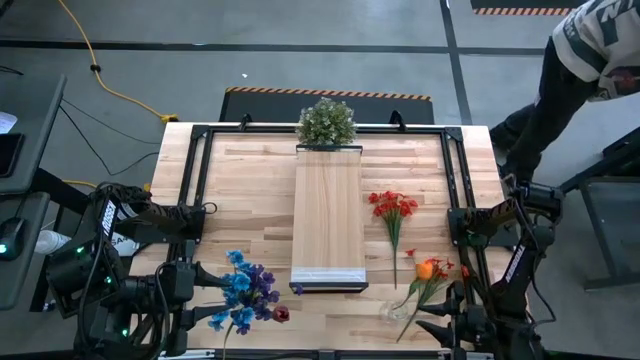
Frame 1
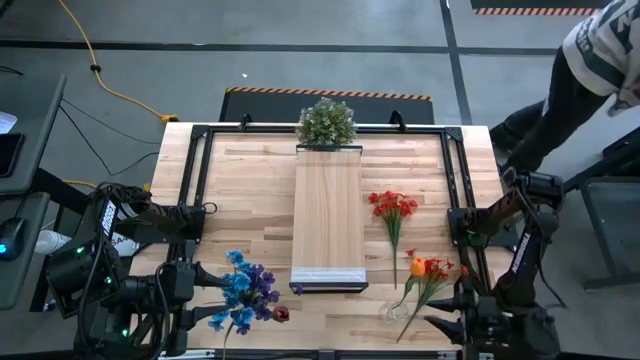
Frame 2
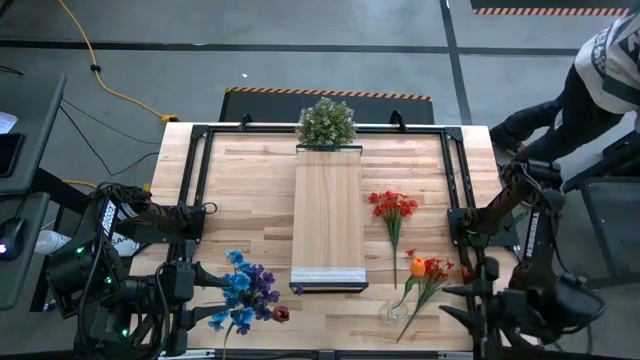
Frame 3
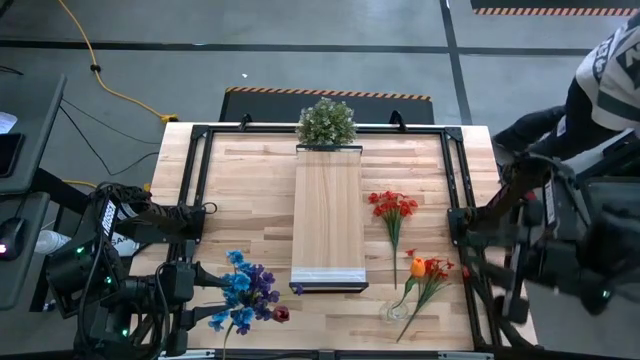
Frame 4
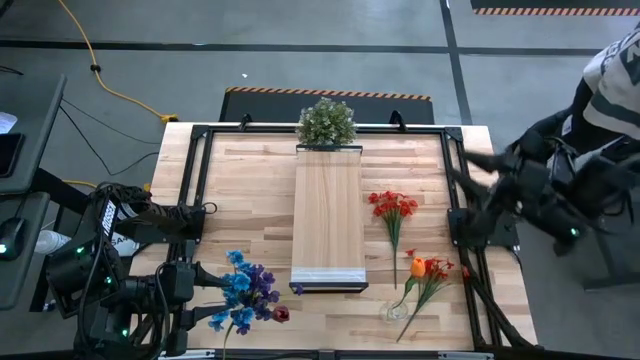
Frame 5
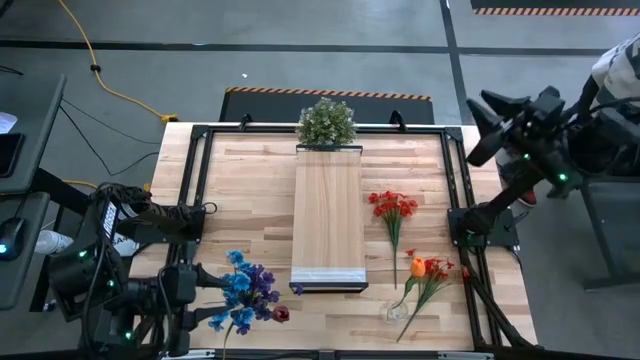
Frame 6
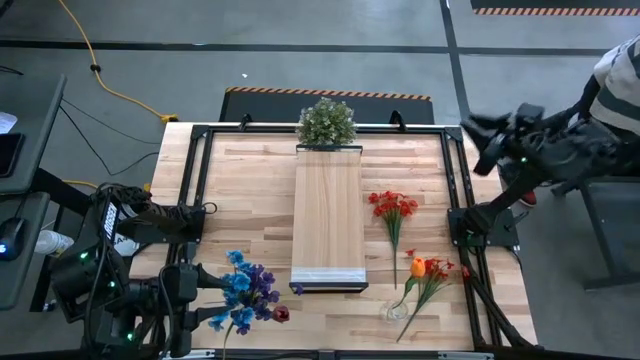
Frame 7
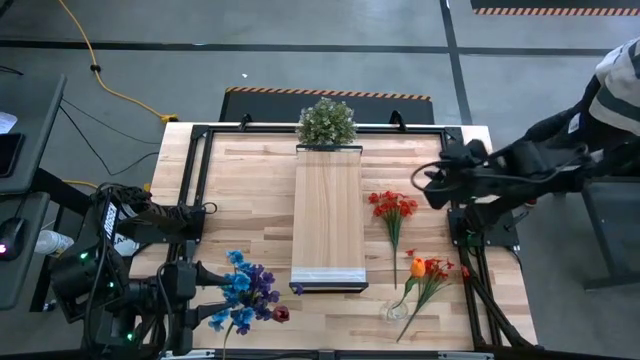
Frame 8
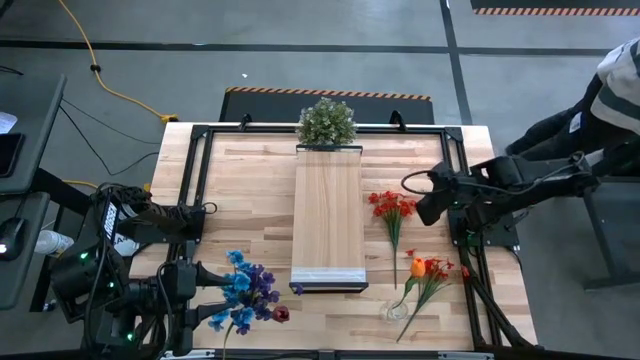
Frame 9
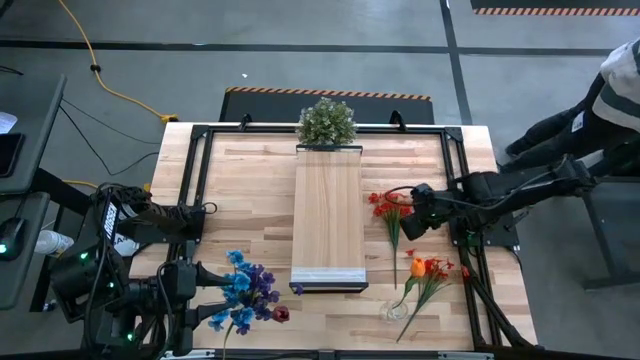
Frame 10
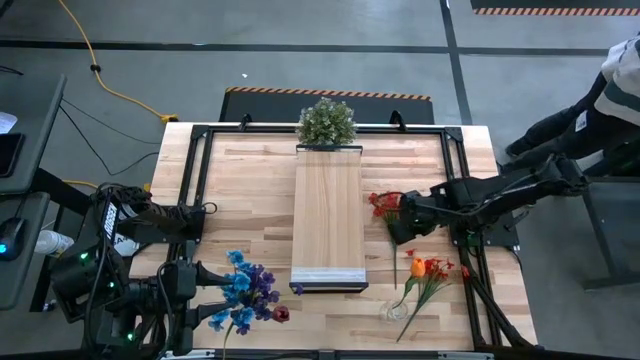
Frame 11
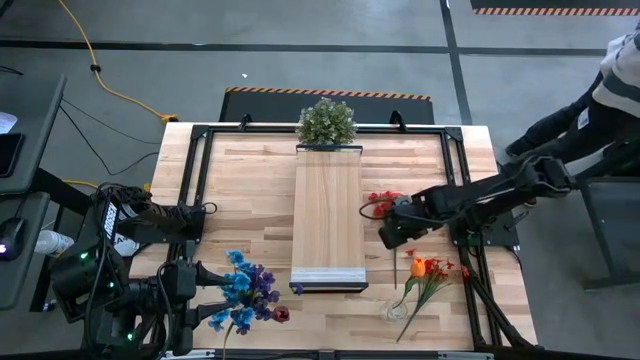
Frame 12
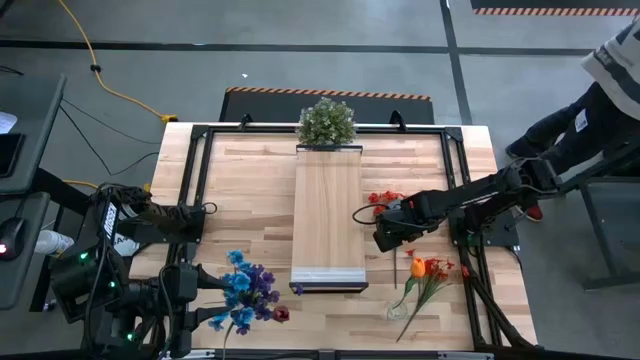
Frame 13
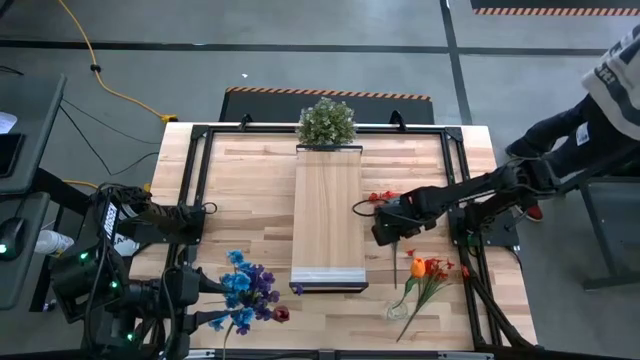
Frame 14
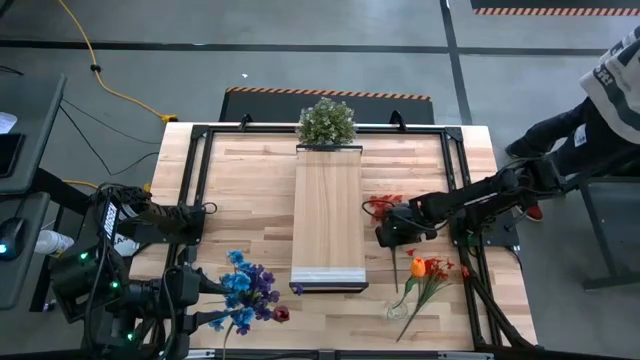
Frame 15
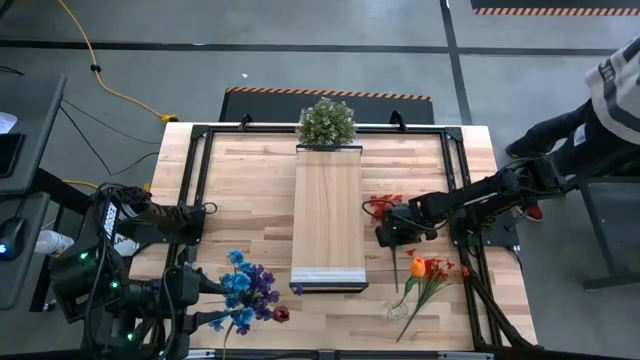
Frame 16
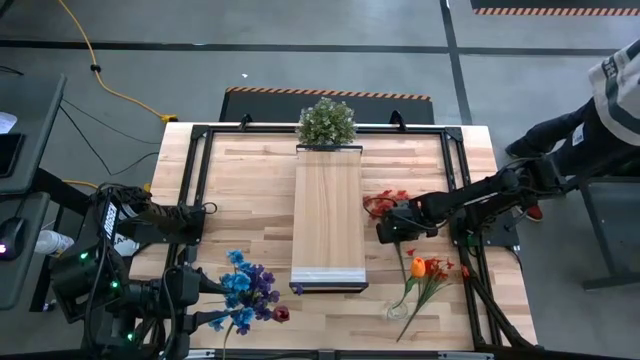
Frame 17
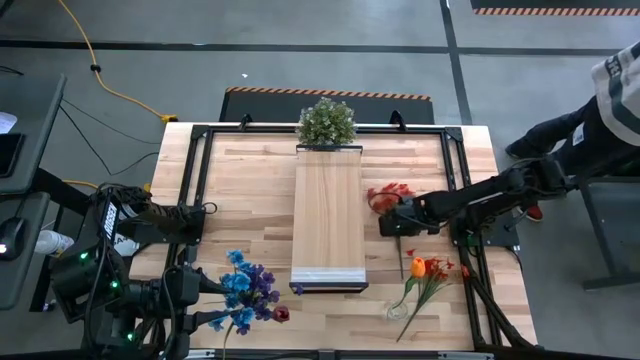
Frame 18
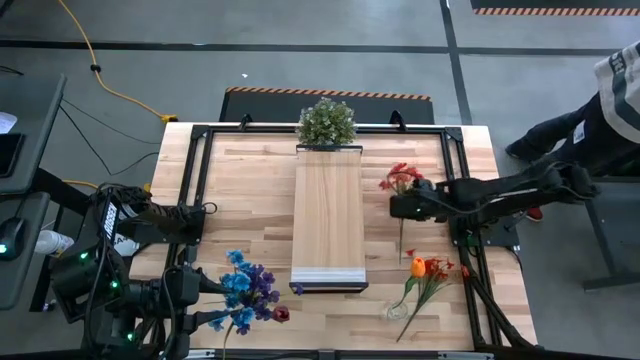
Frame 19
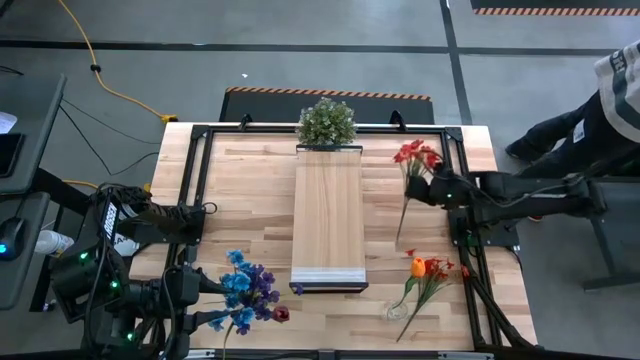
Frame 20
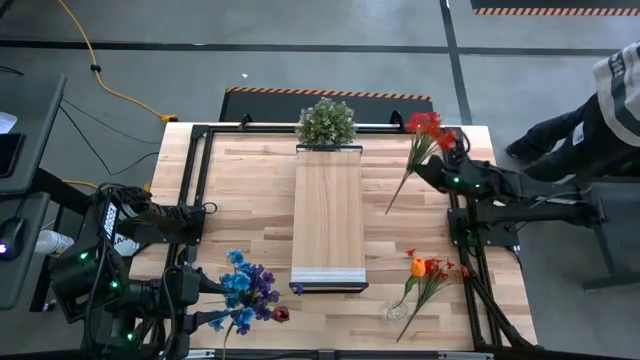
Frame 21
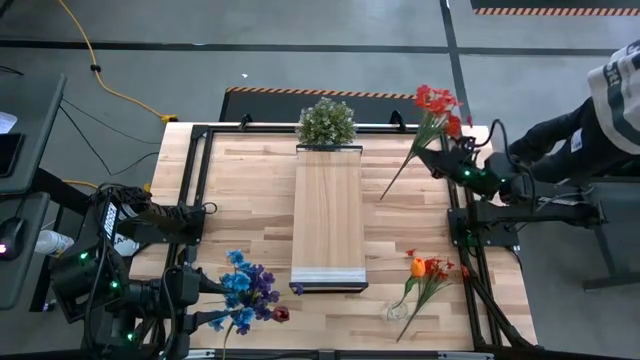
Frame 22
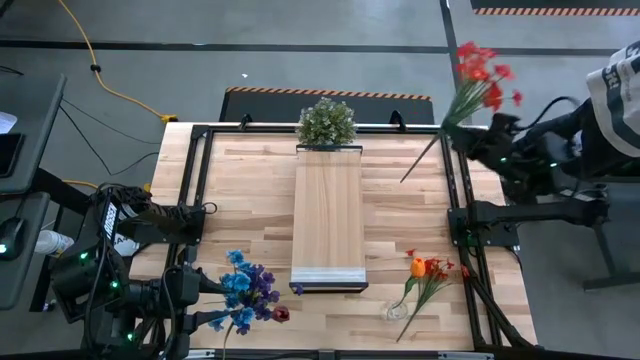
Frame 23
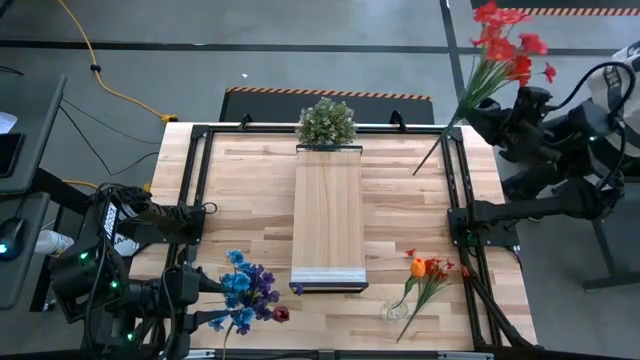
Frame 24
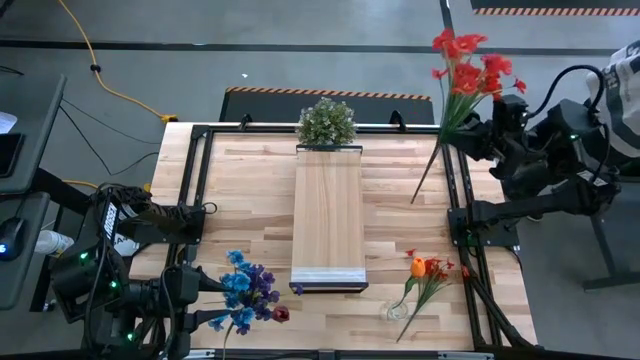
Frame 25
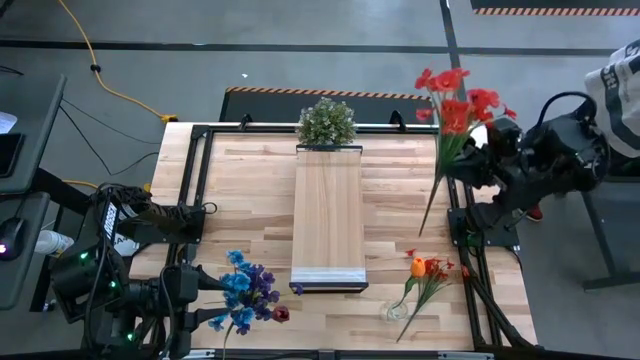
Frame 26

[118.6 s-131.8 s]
Task: Pick and place flowers into a vace then onto a shelf
Put the top red flowers into the right transparent vase

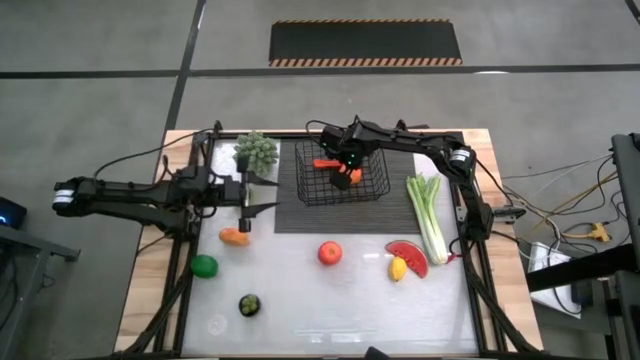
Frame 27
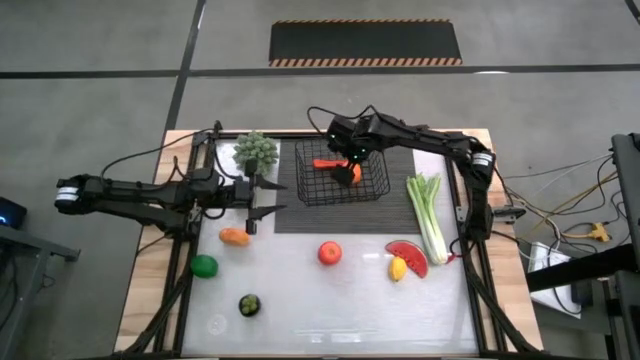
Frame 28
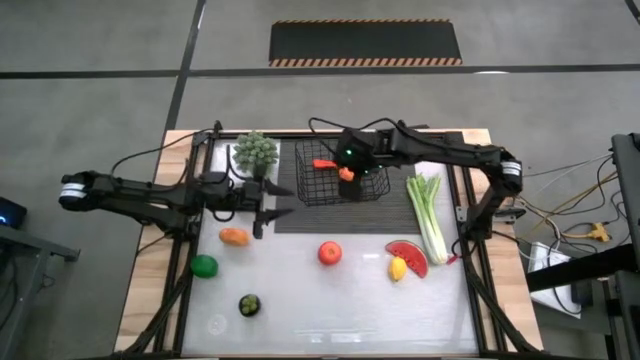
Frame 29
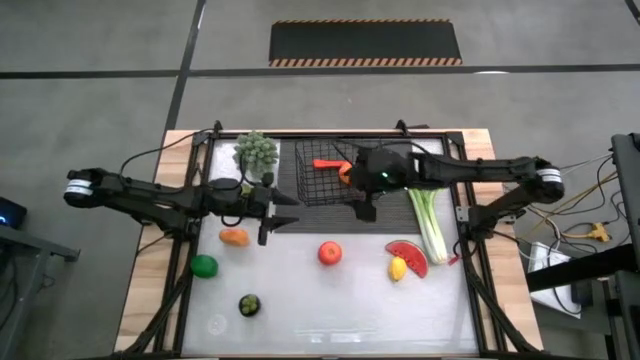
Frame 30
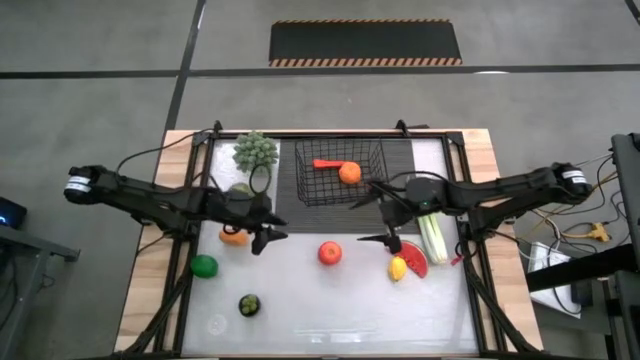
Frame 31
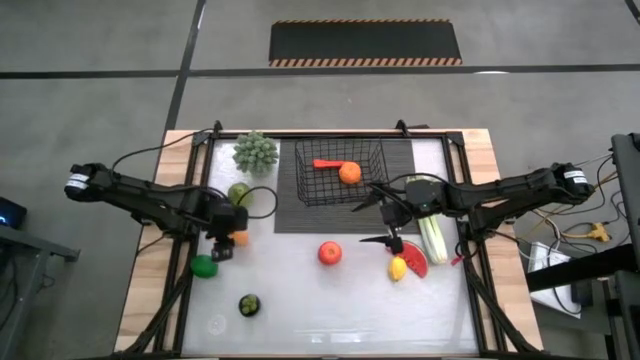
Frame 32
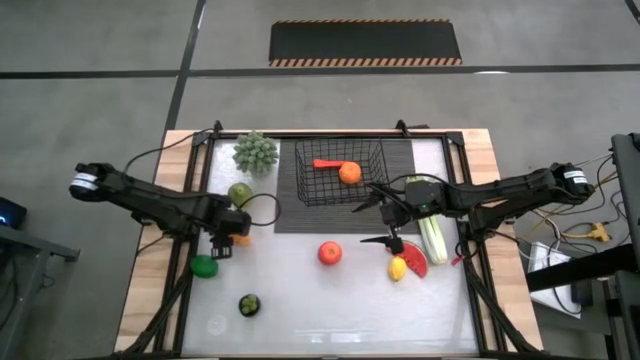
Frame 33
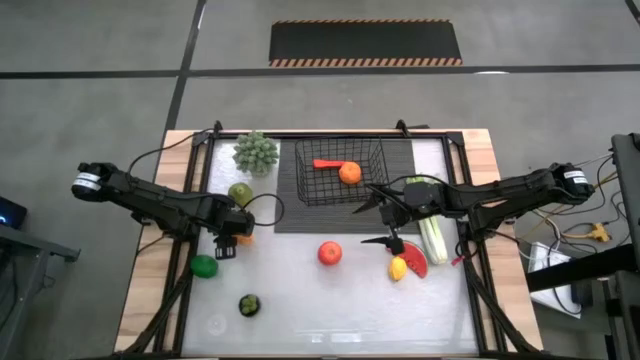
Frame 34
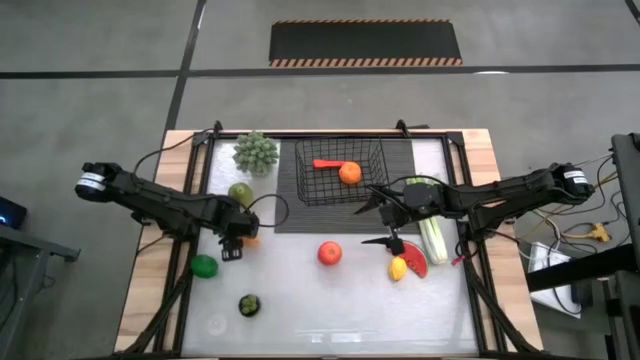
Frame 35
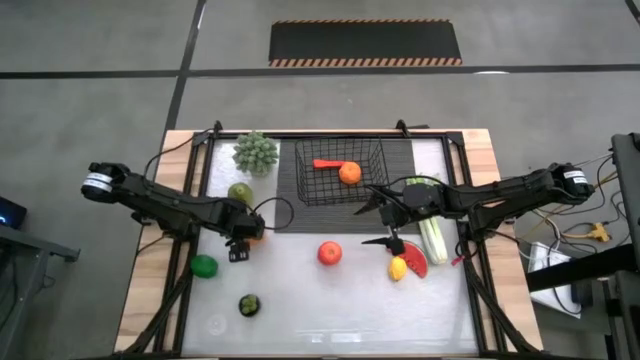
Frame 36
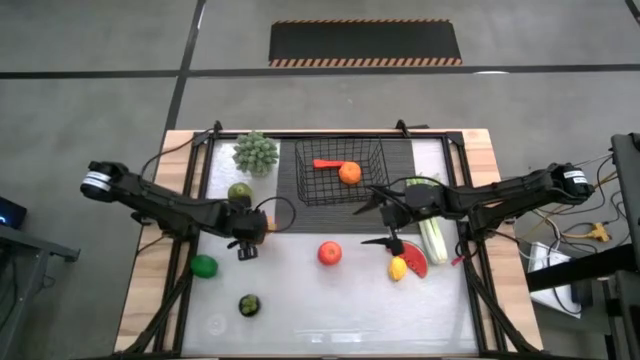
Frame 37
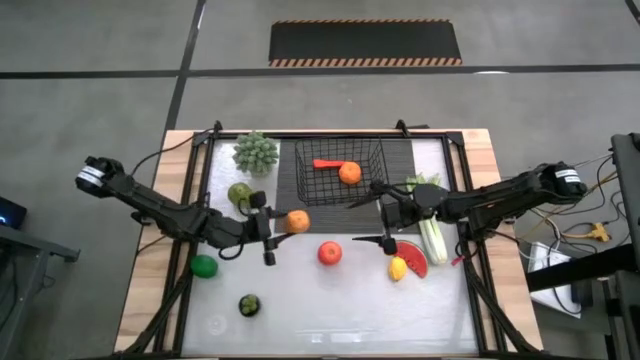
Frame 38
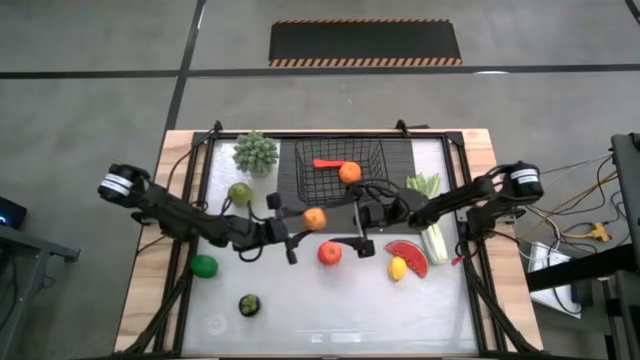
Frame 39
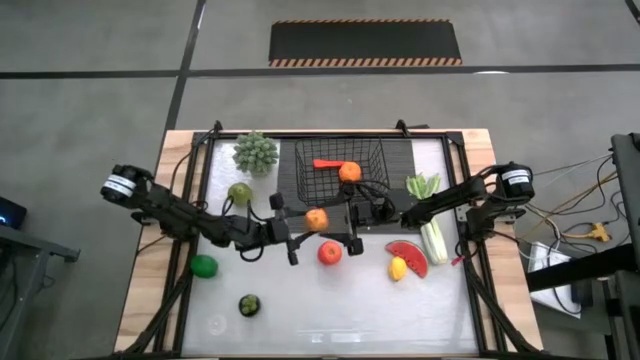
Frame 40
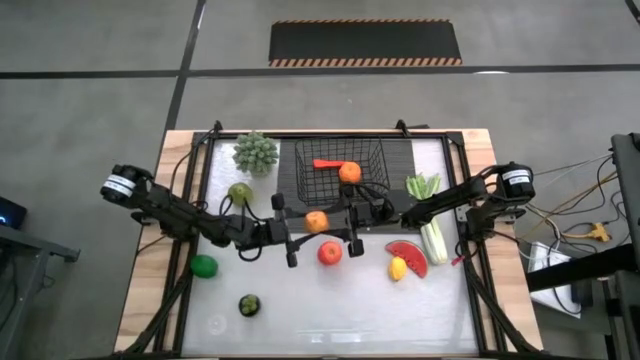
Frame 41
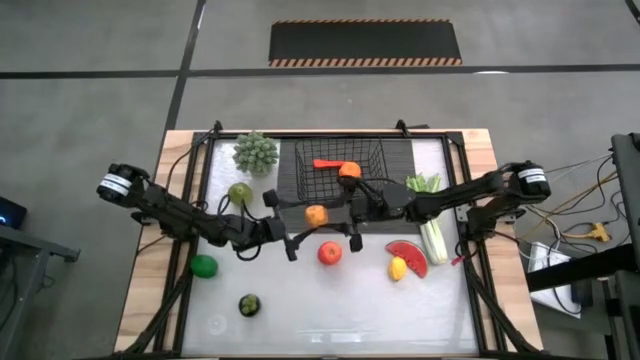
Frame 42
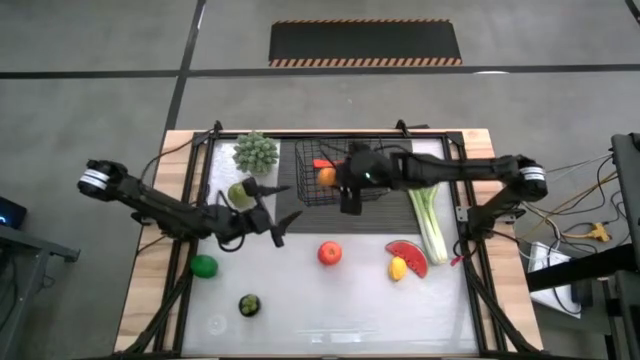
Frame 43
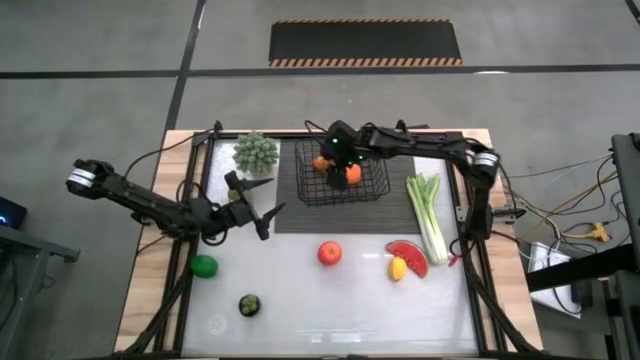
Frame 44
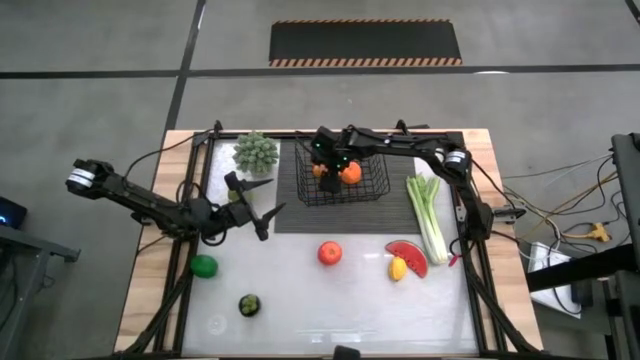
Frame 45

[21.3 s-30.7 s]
Task: Build produce basket
Put the yellow mango into the black wire basket
